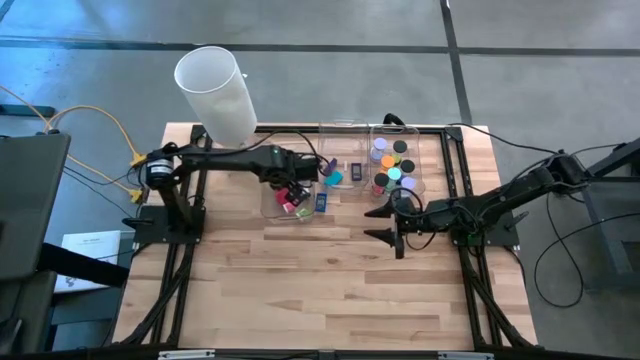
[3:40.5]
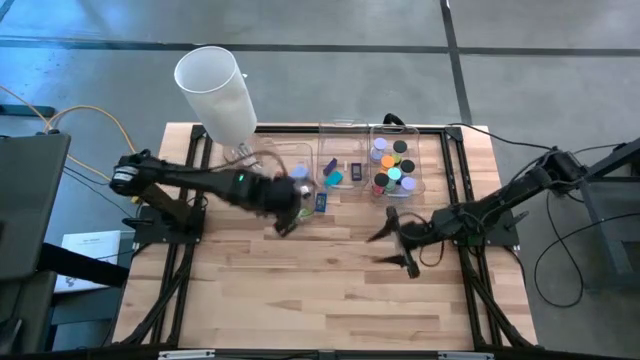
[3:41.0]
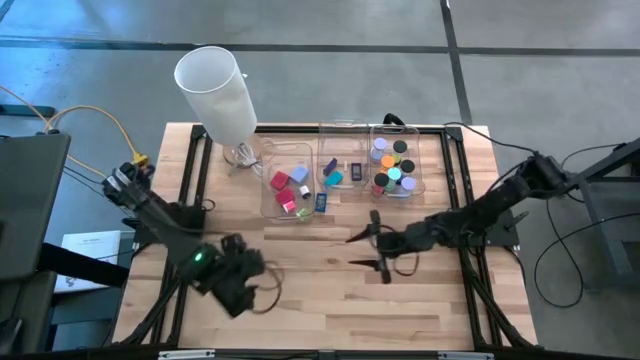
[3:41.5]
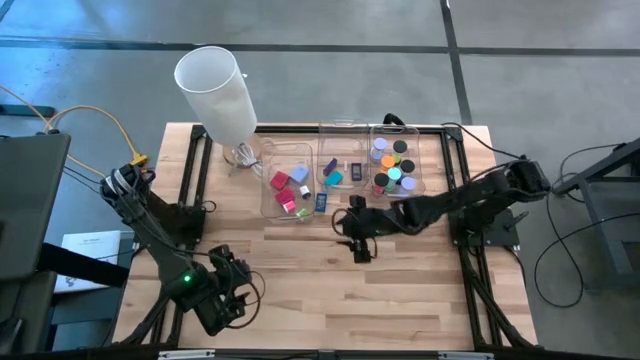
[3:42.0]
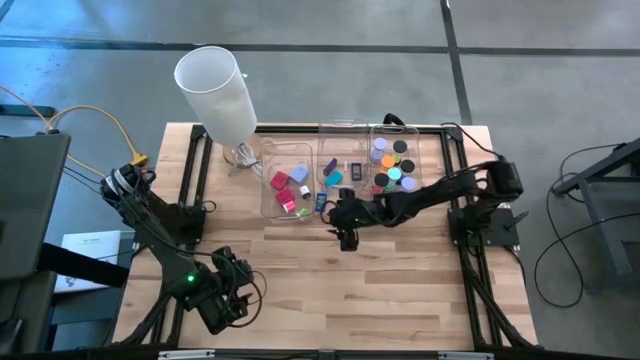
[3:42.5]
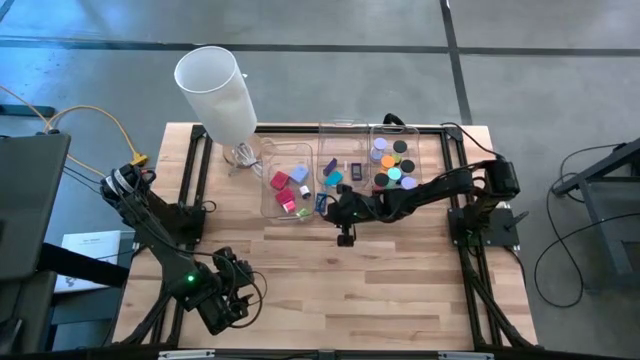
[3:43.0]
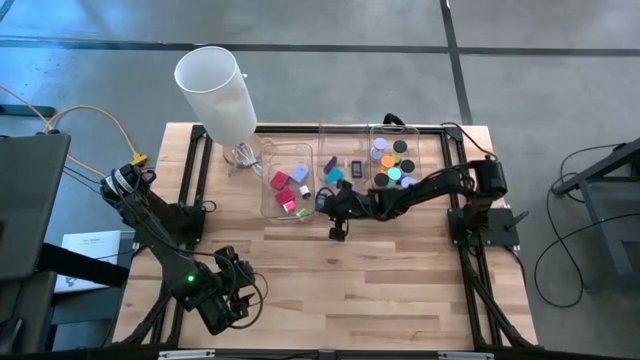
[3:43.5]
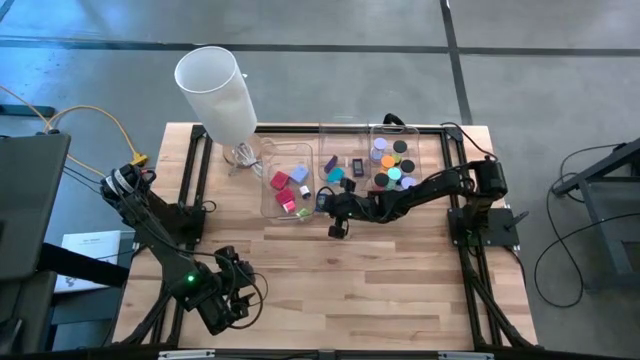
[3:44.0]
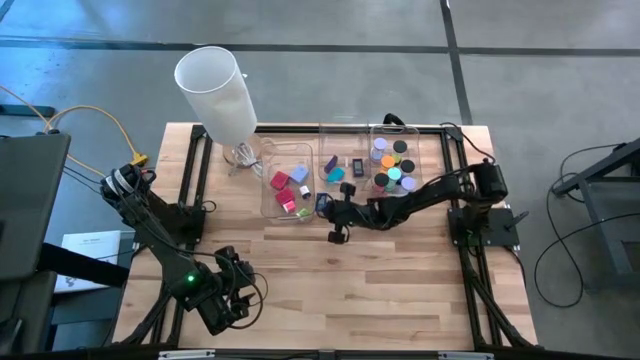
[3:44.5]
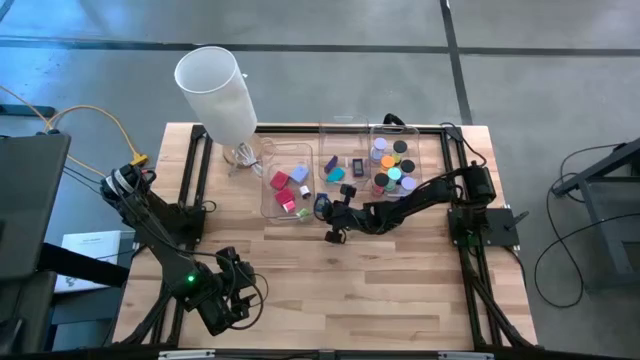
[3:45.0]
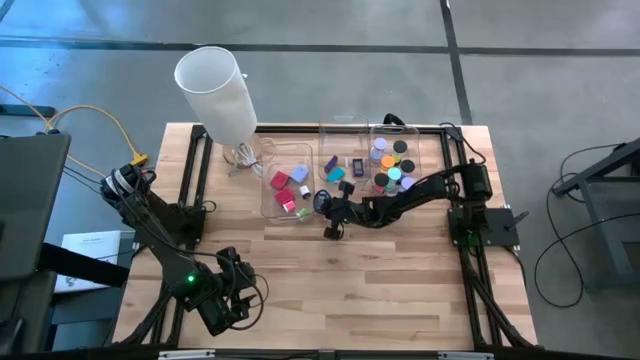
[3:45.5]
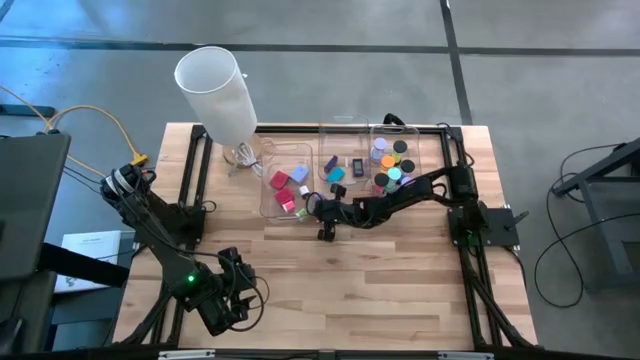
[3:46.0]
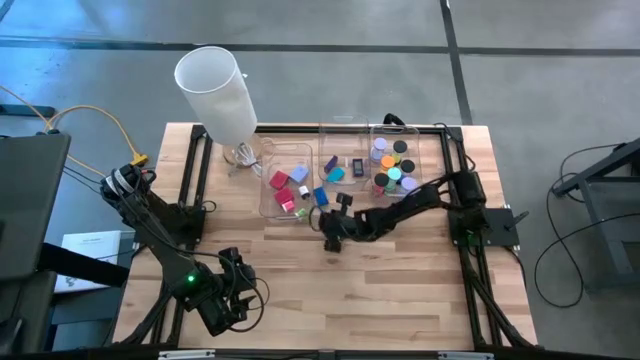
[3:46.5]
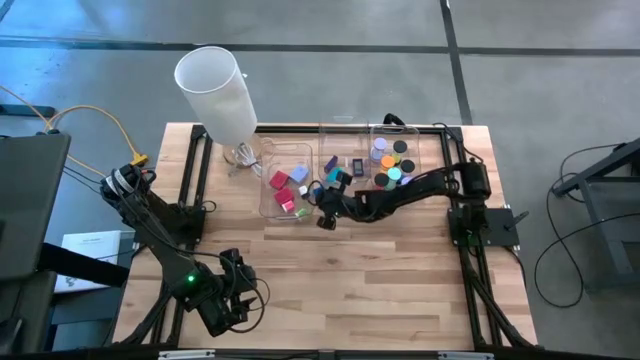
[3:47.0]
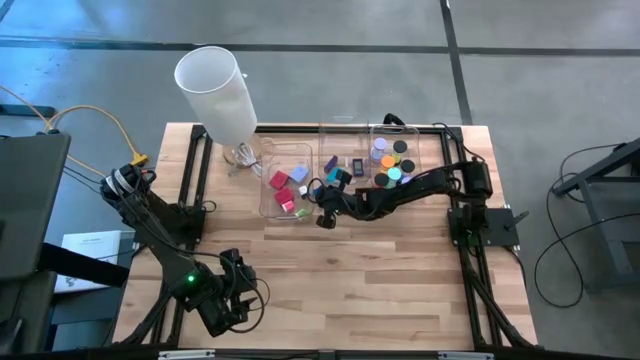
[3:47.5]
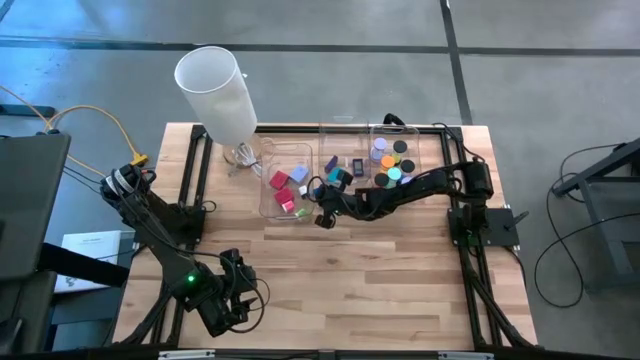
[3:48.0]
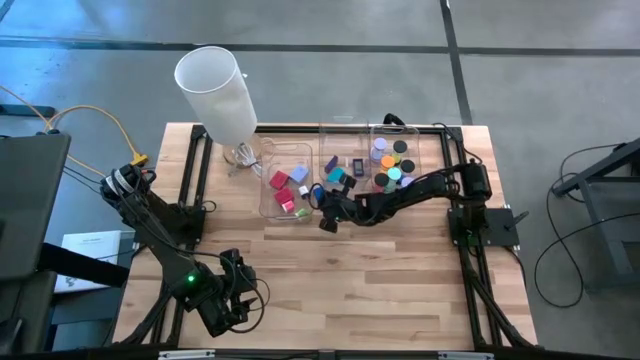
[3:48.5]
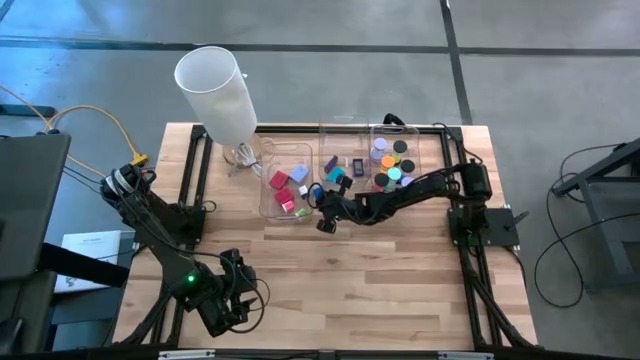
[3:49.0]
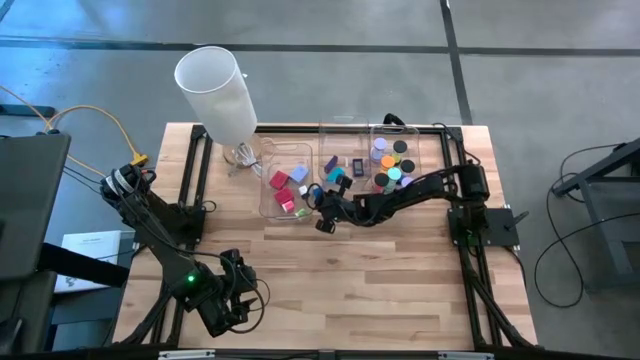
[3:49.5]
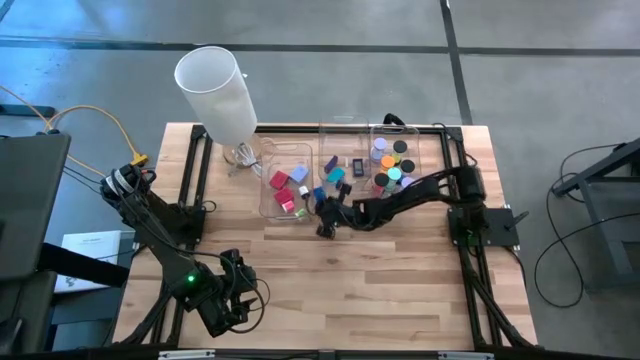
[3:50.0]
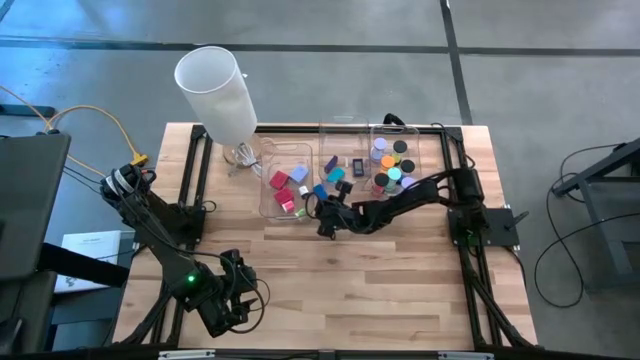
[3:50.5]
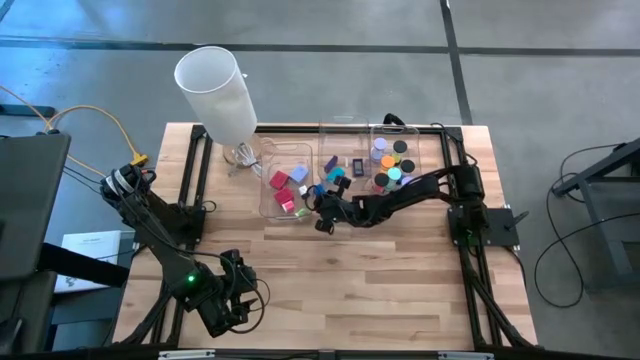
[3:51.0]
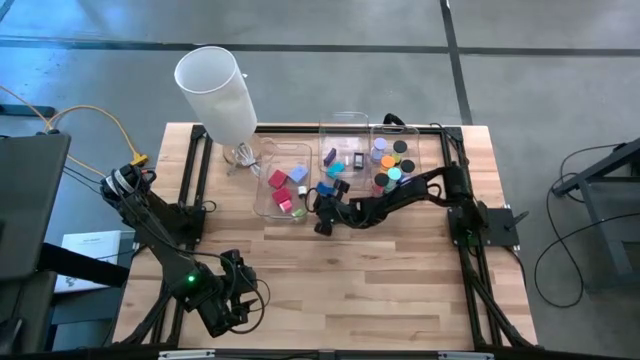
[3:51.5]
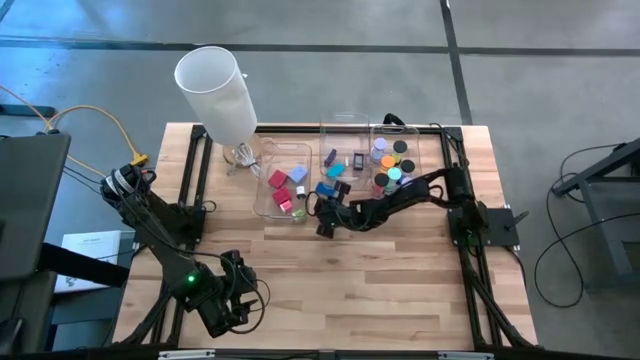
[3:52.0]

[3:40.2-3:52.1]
Task: Pick & Place Office items
Put the blue digital clock into the middle transparent bin

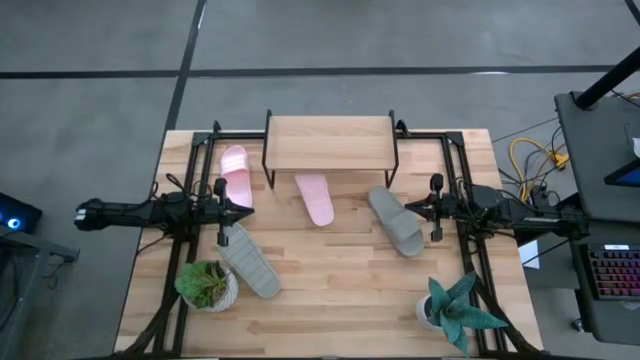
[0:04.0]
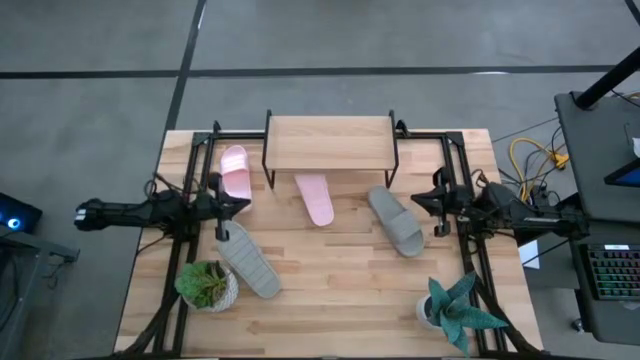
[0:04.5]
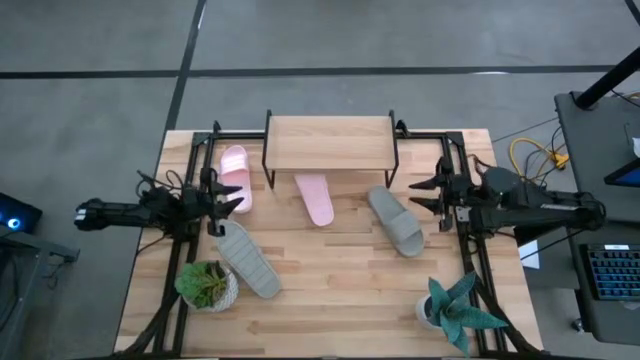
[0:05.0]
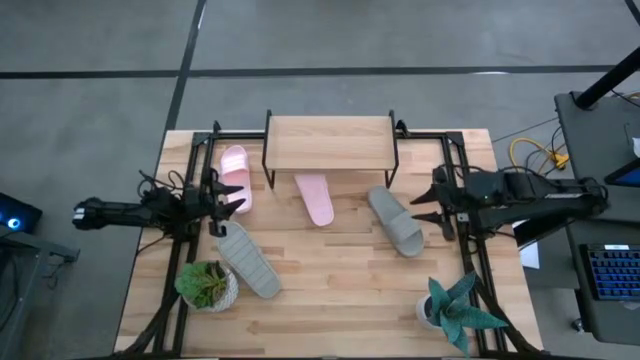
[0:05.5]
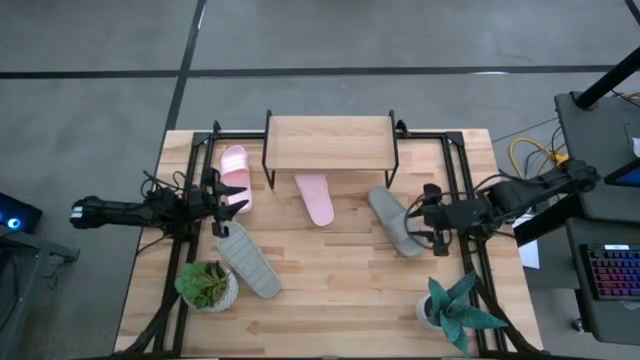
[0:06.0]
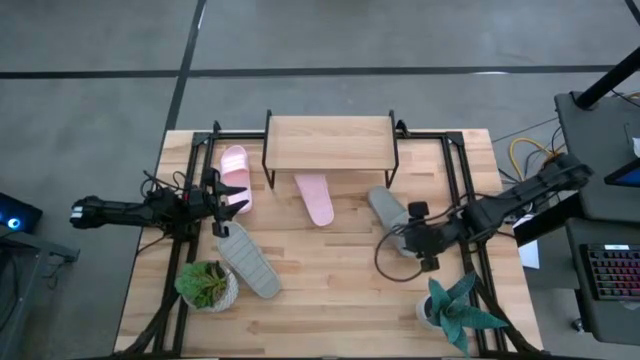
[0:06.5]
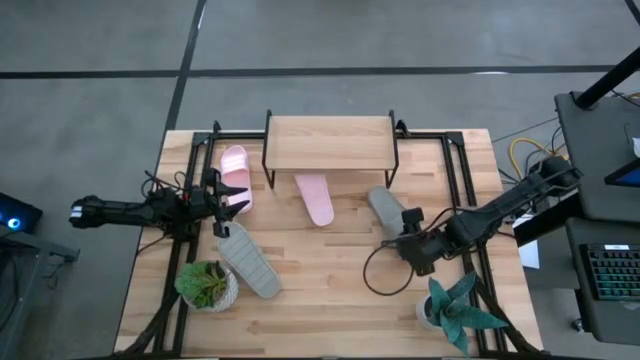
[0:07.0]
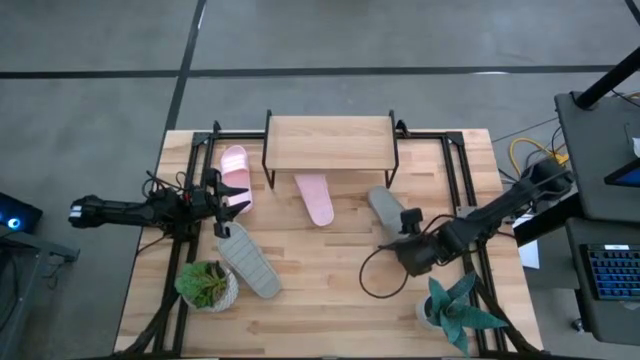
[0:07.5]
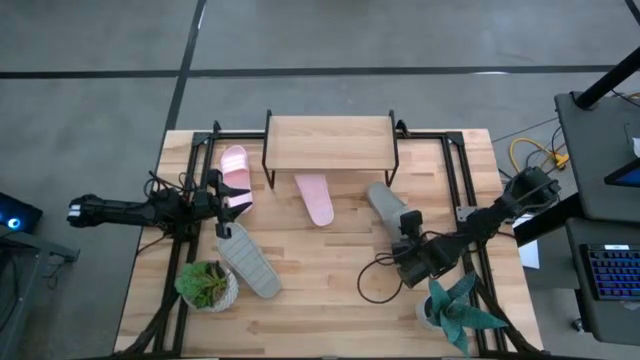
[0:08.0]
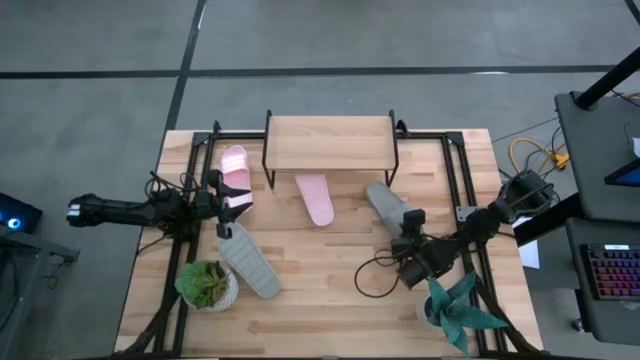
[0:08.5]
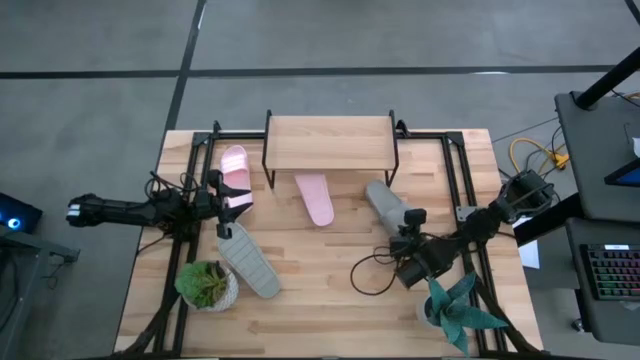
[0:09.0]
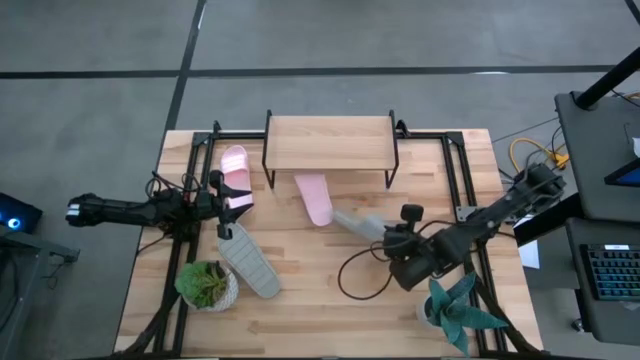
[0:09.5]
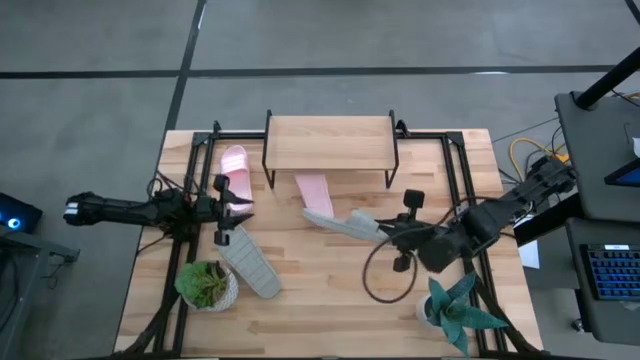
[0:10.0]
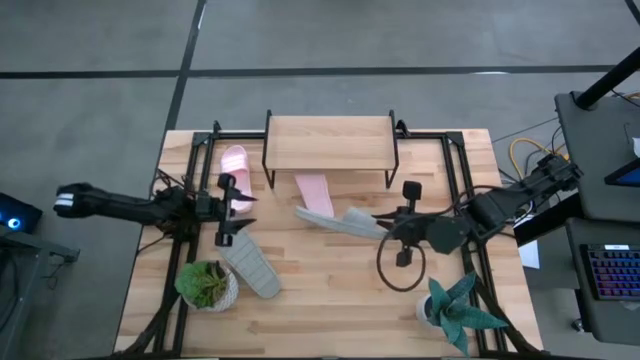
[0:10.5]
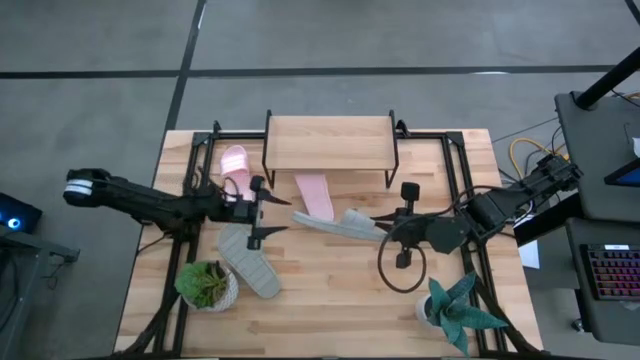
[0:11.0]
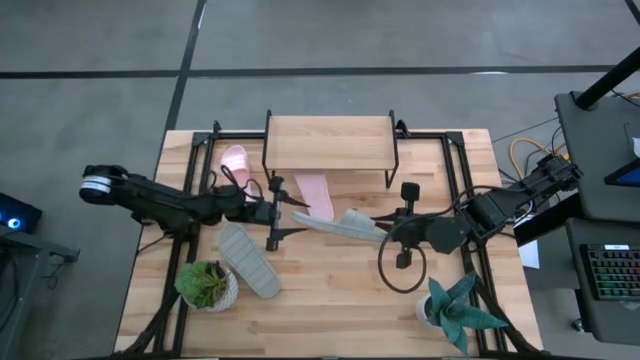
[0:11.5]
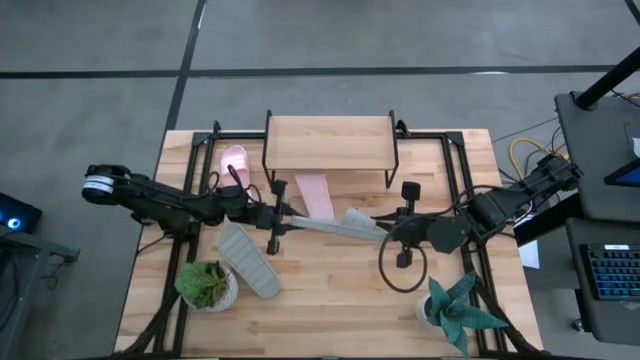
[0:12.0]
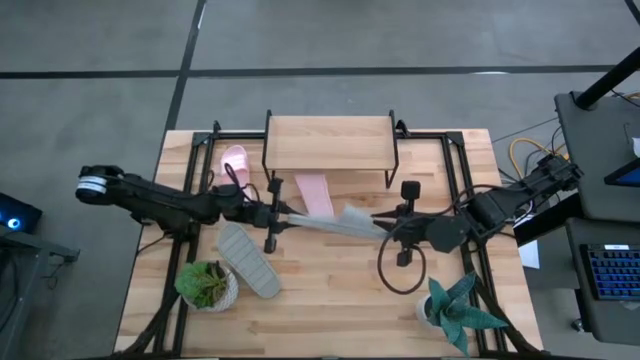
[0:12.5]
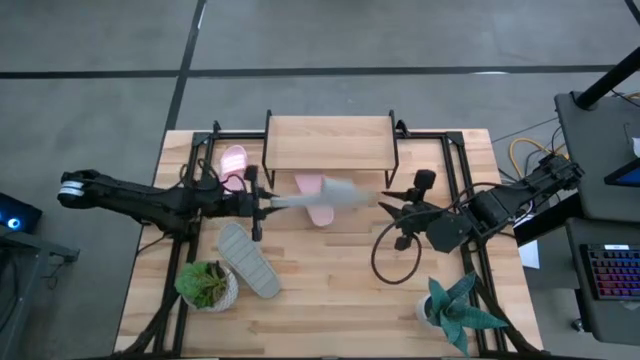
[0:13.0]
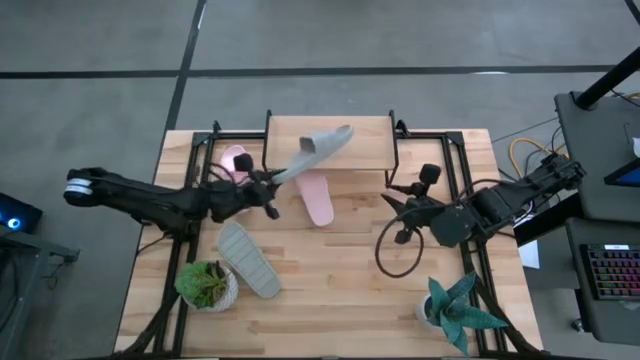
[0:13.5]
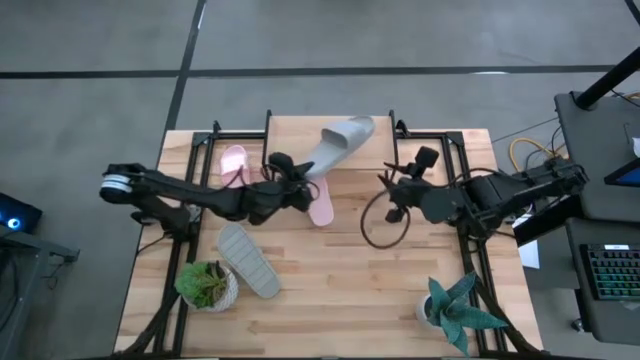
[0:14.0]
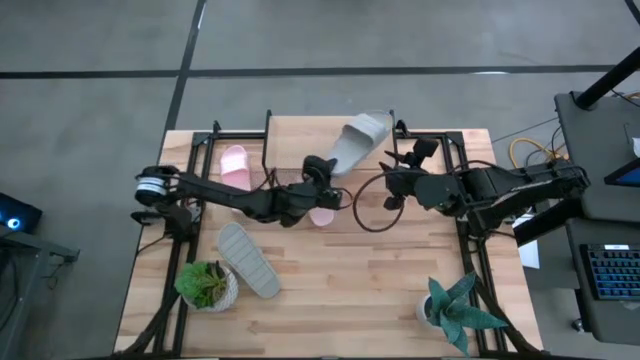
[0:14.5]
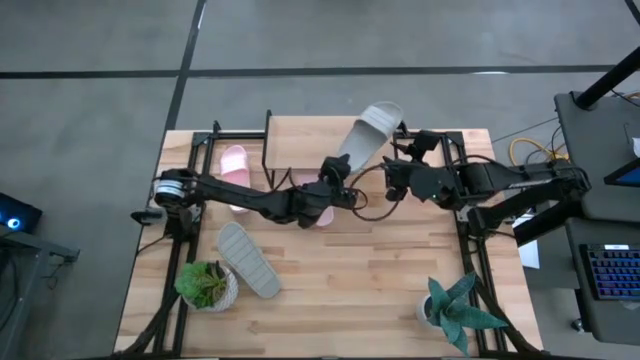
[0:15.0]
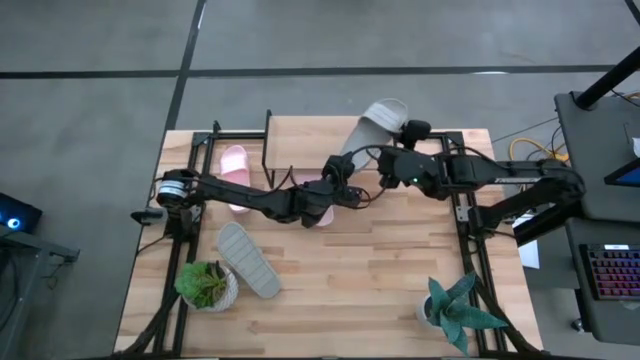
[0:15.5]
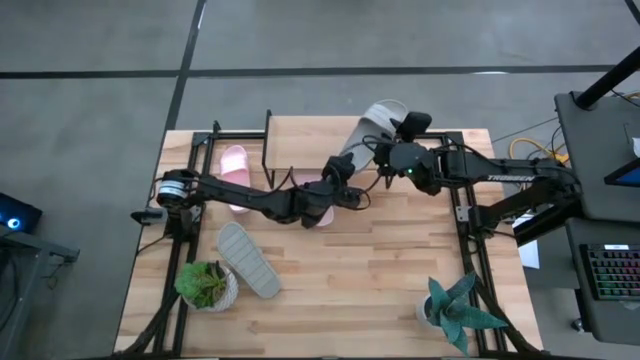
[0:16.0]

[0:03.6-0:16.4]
Task: Pick and place slides into the shelf
Put the right gray slide on the shelf
